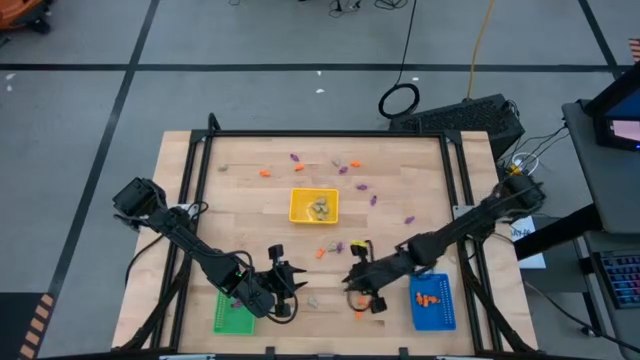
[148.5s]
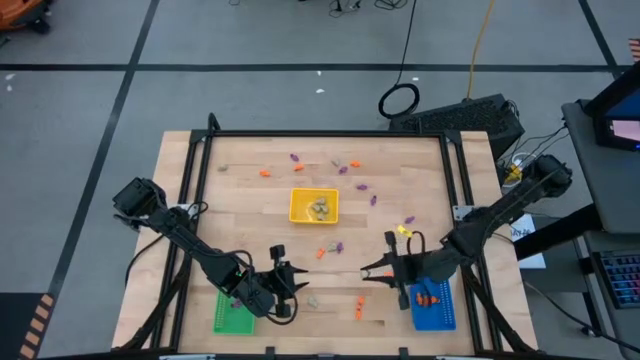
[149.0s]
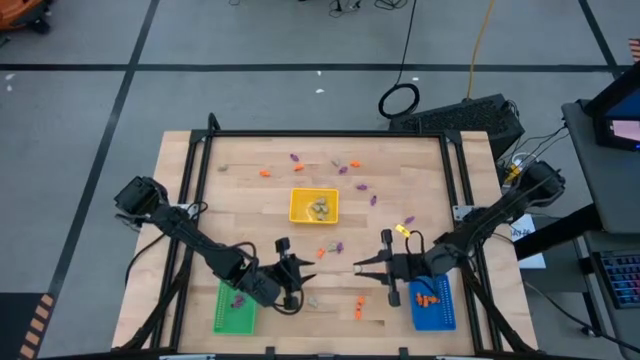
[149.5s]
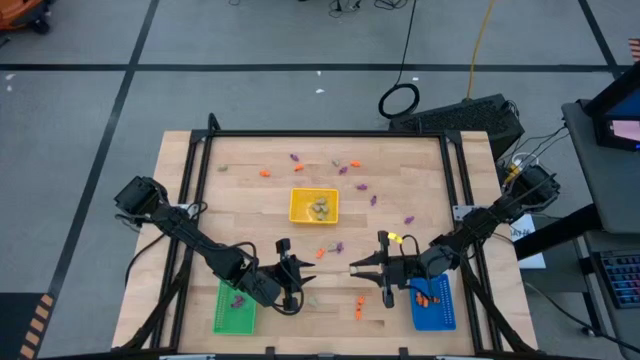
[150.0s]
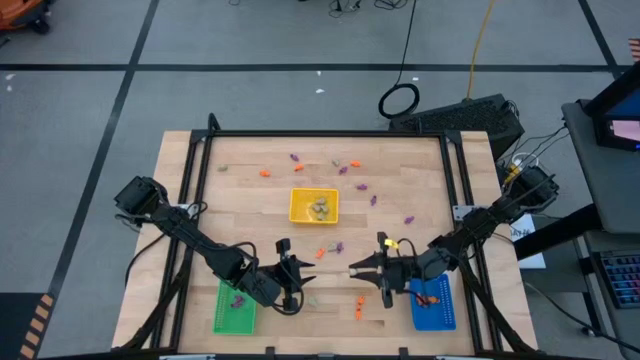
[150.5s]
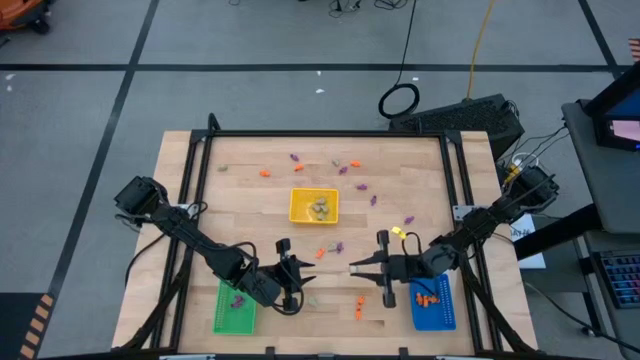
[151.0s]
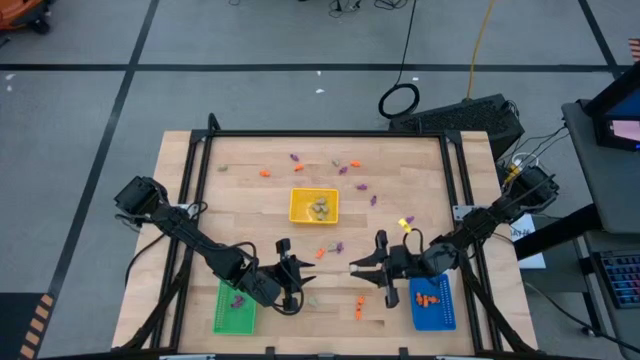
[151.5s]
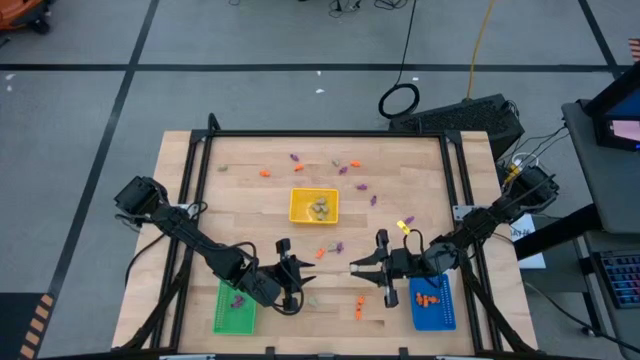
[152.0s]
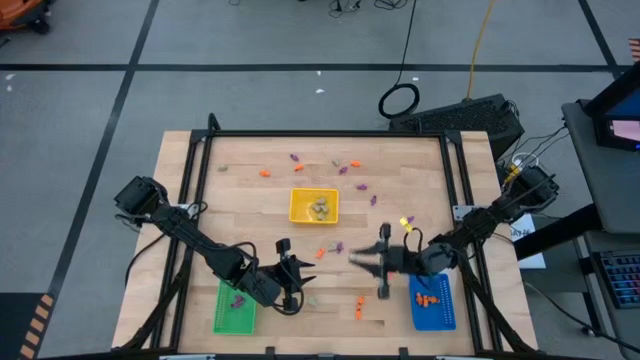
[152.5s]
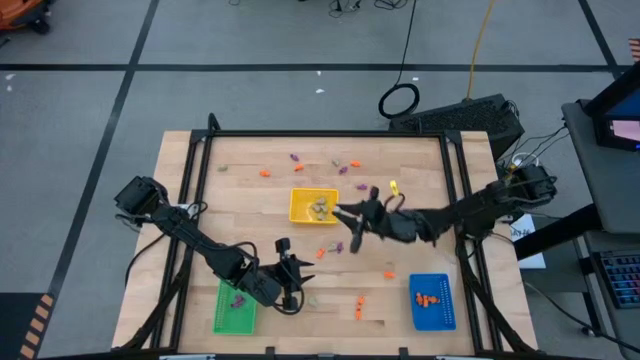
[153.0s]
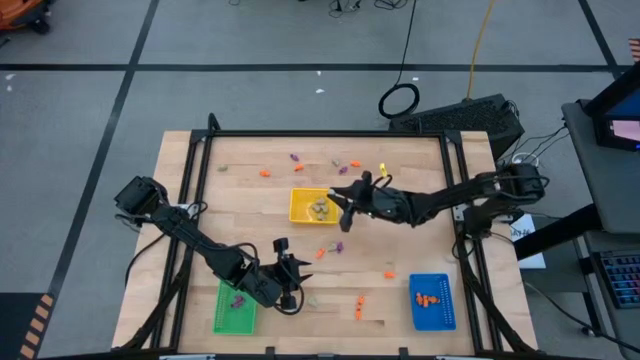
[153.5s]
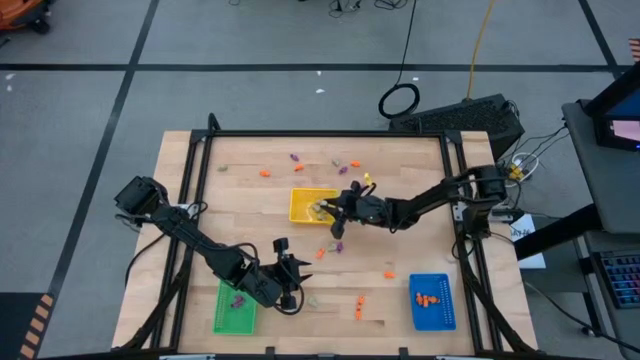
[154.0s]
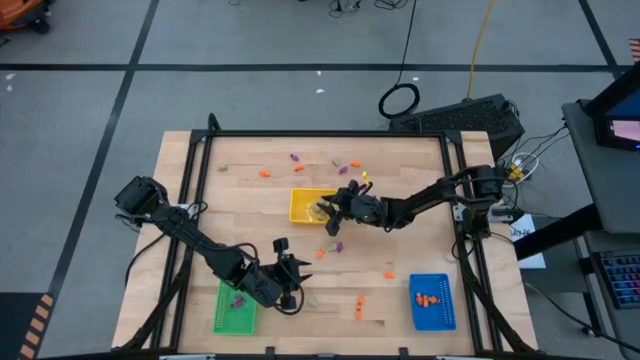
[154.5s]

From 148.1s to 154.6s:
Task: Sort Halloween decoration
Put the white skull toy in the yellow basket

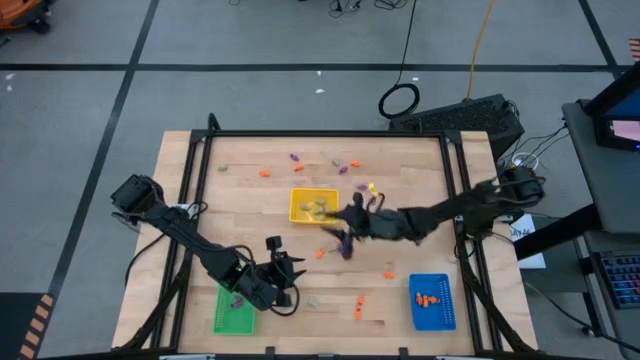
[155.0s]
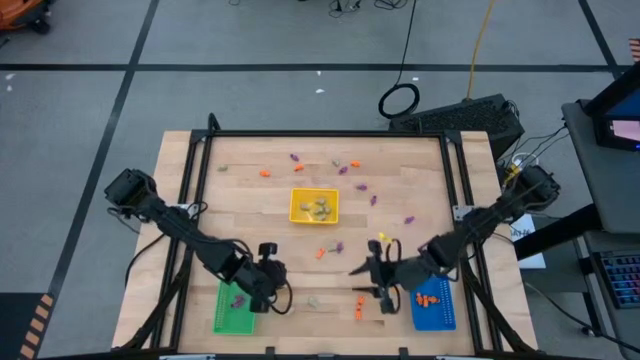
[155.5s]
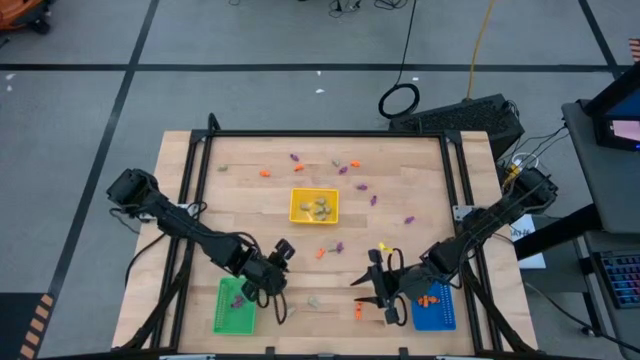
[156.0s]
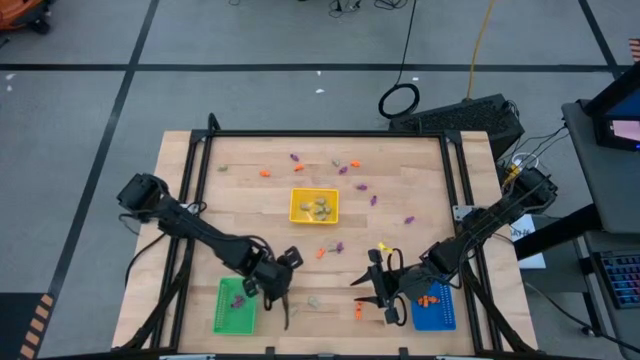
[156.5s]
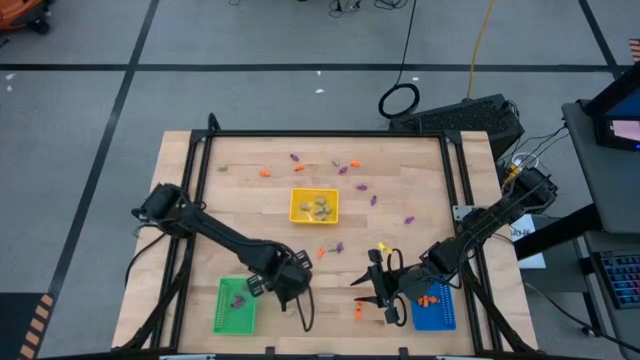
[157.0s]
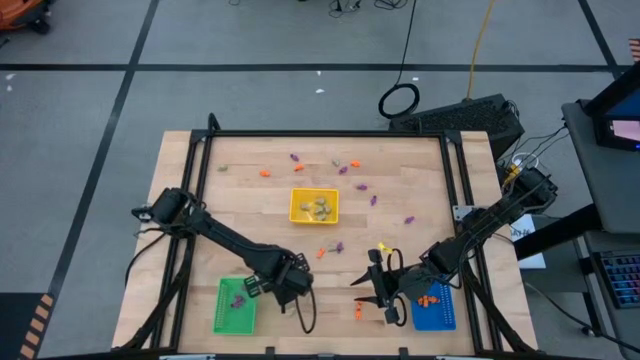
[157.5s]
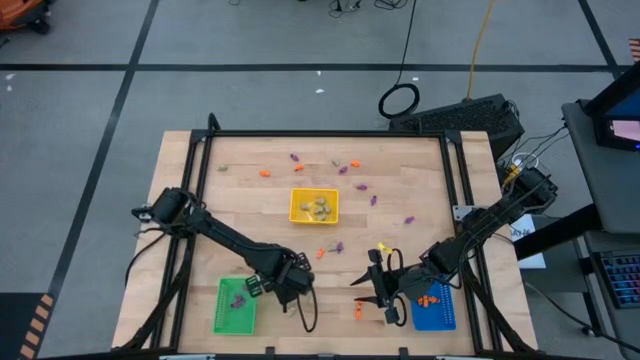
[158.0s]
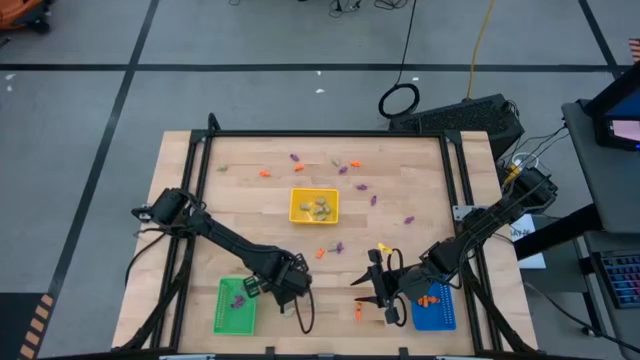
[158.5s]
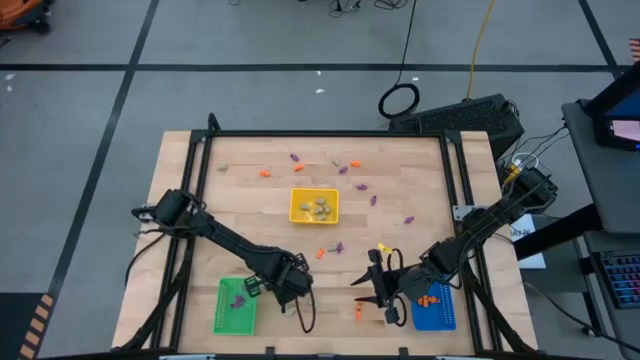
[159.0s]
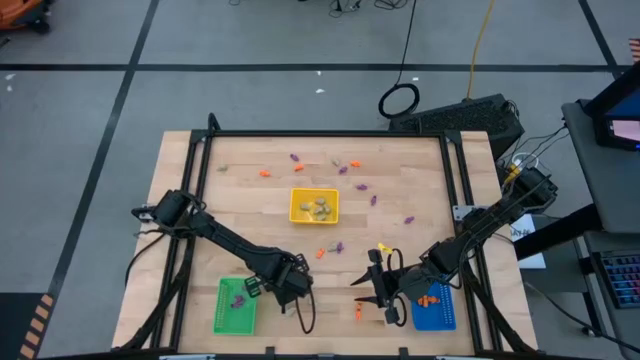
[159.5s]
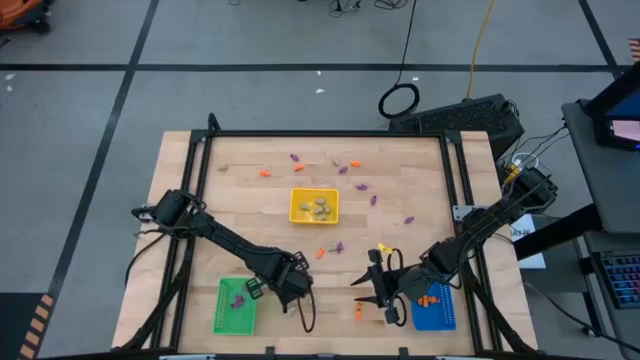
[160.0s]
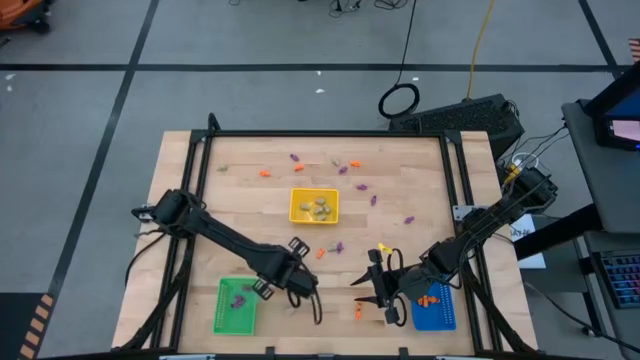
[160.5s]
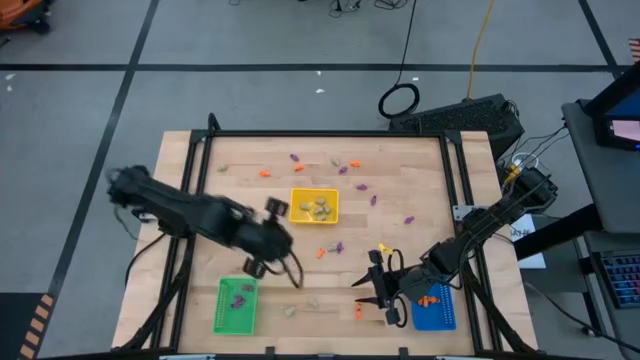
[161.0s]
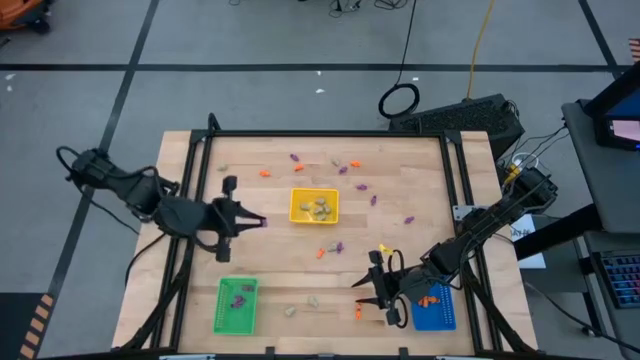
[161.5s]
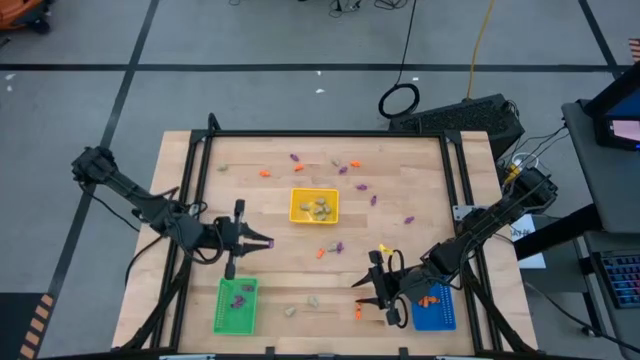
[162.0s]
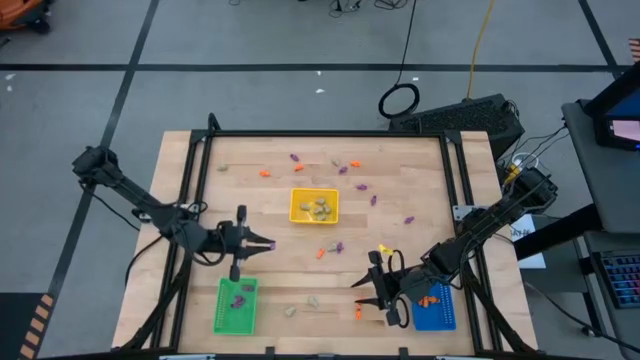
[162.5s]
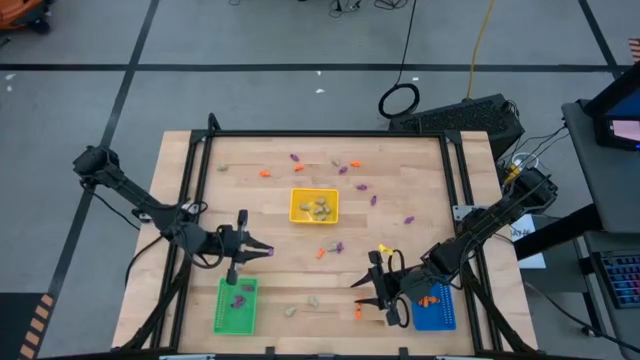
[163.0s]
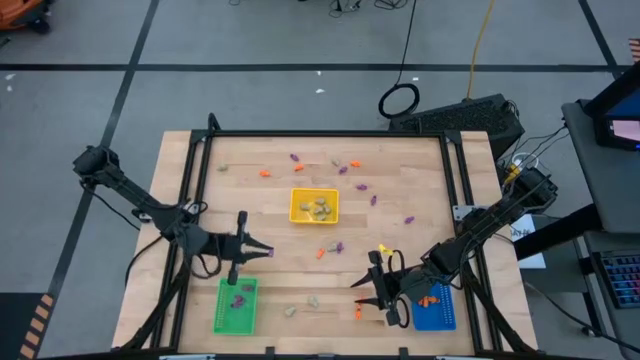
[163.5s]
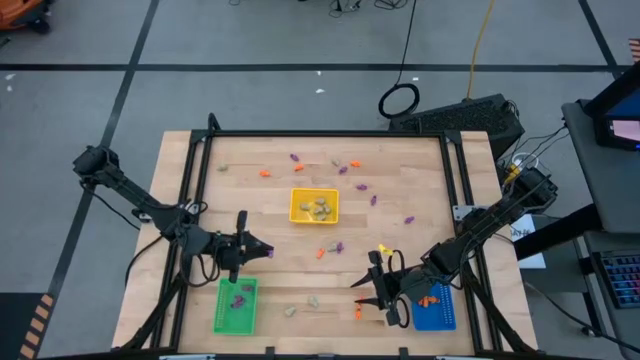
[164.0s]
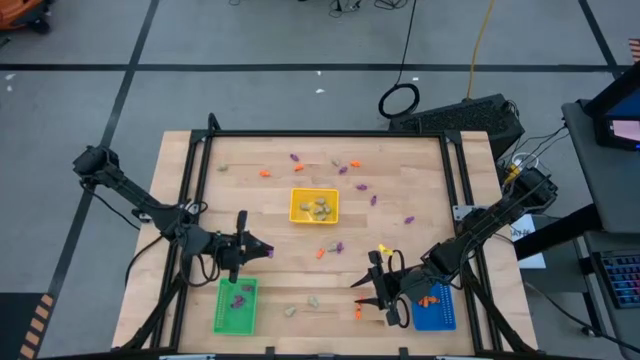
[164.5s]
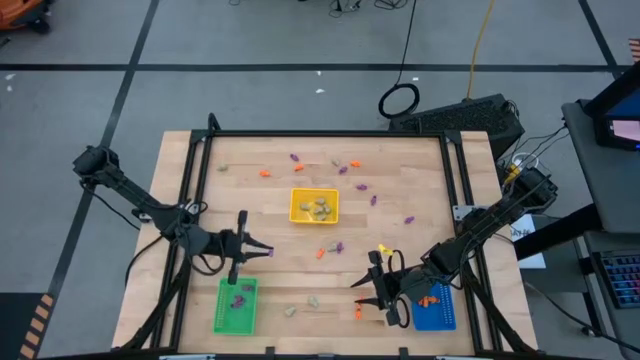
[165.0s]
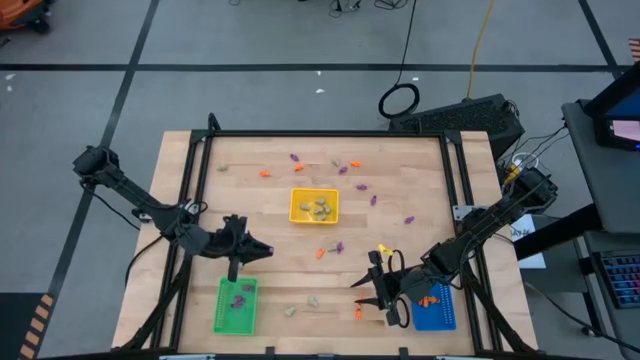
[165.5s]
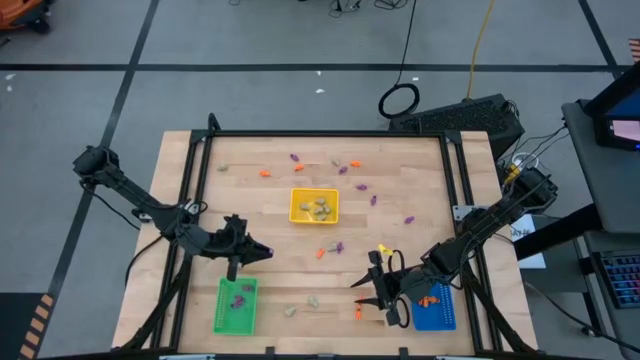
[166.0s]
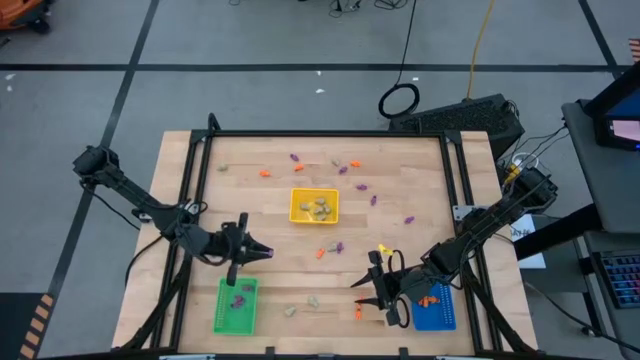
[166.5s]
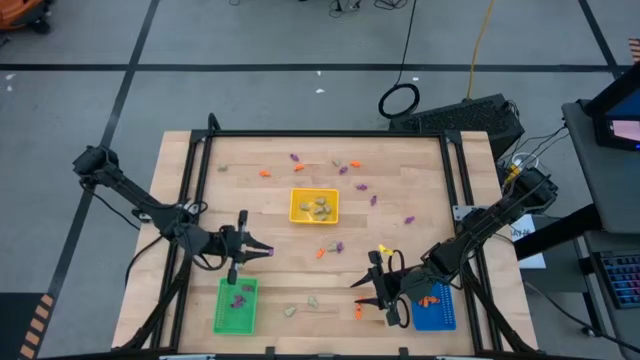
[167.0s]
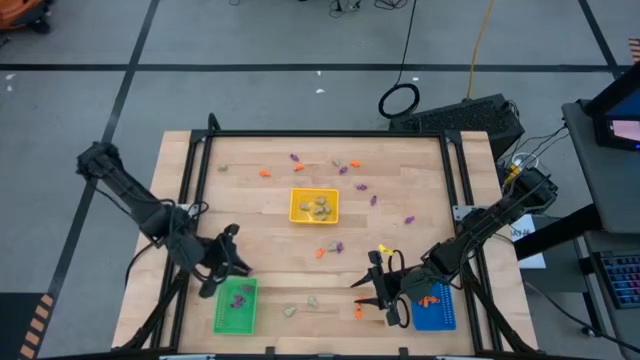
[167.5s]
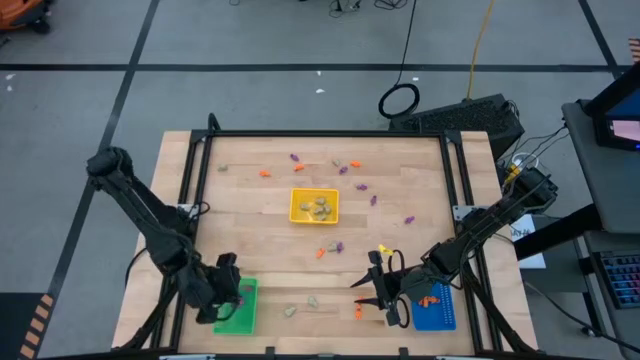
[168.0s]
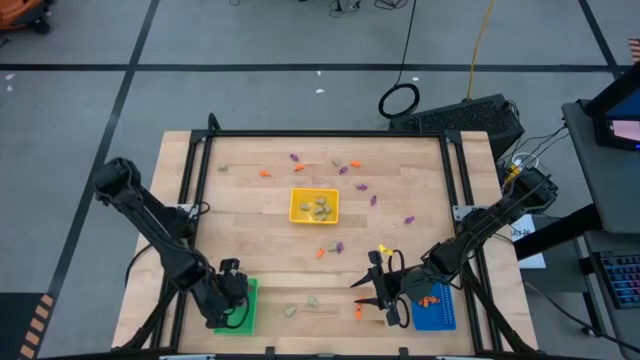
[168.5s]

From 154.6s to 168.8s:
Put the purple skeleton toy in the green basket
